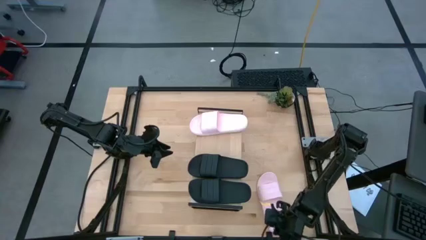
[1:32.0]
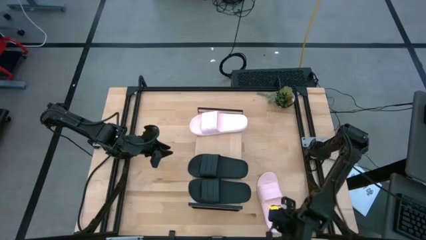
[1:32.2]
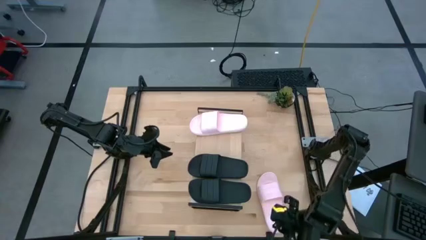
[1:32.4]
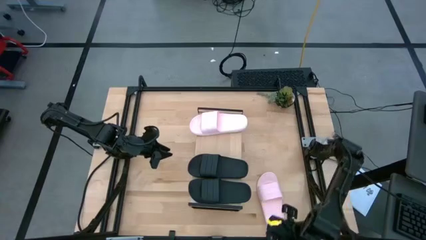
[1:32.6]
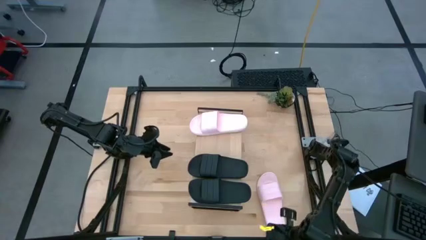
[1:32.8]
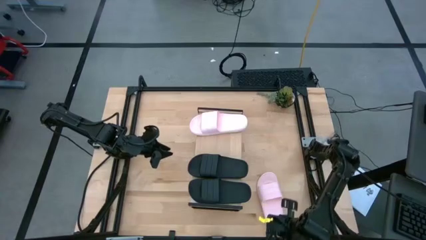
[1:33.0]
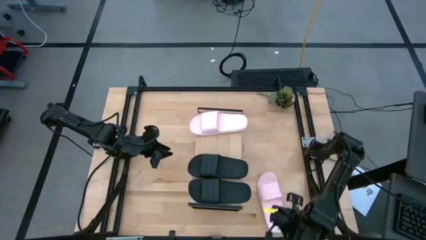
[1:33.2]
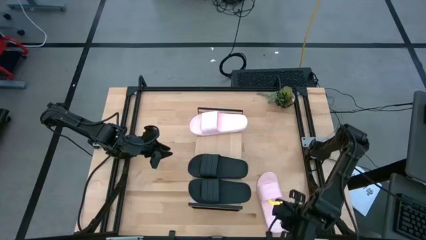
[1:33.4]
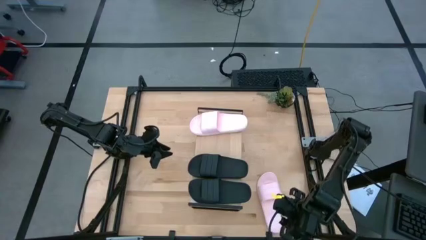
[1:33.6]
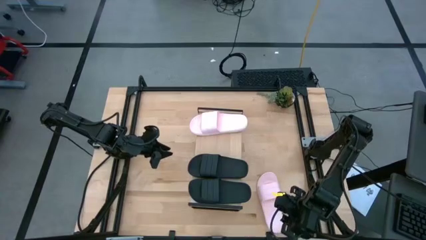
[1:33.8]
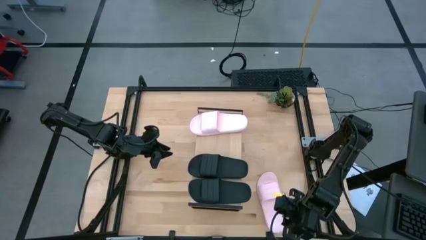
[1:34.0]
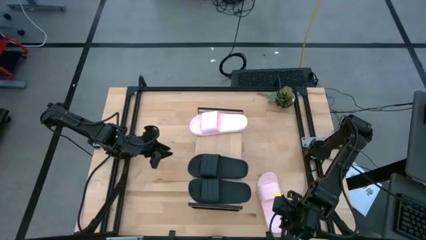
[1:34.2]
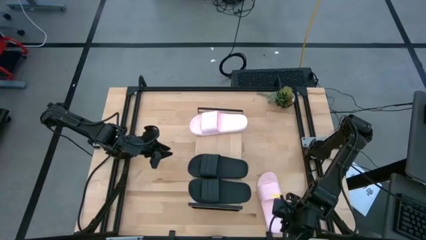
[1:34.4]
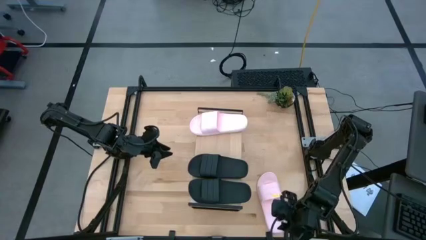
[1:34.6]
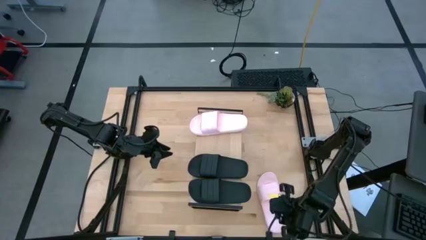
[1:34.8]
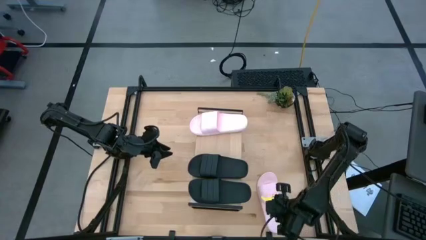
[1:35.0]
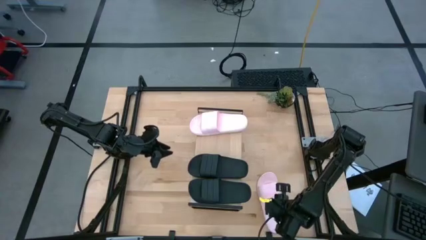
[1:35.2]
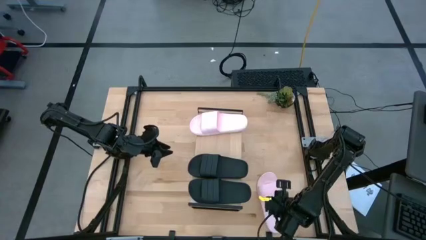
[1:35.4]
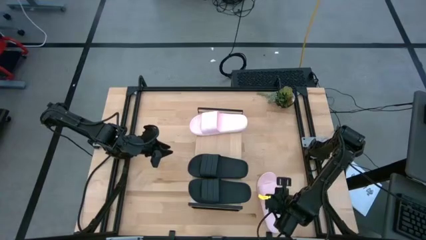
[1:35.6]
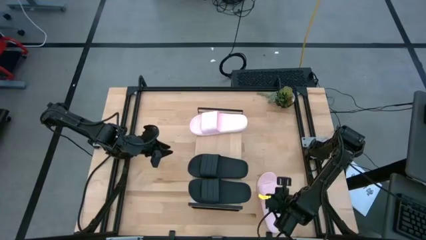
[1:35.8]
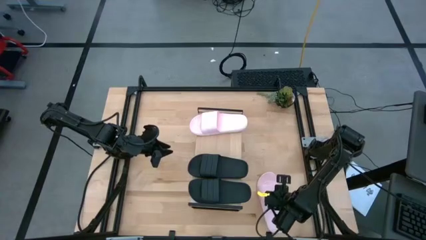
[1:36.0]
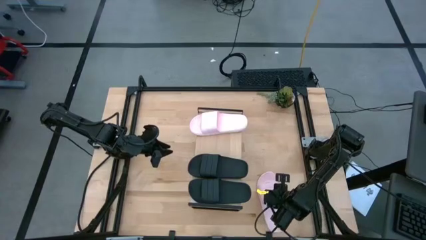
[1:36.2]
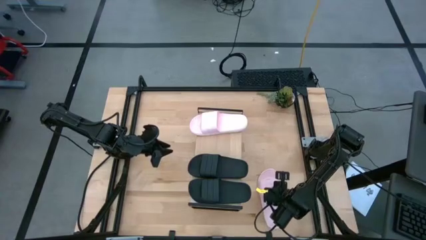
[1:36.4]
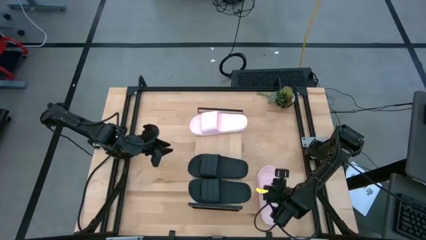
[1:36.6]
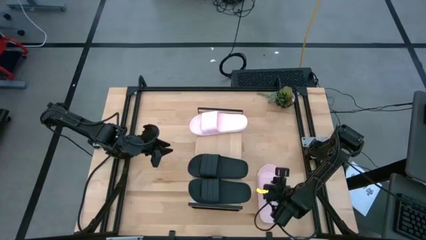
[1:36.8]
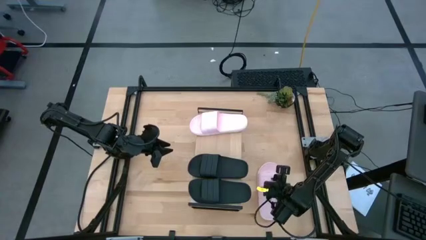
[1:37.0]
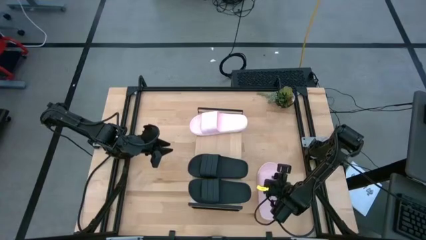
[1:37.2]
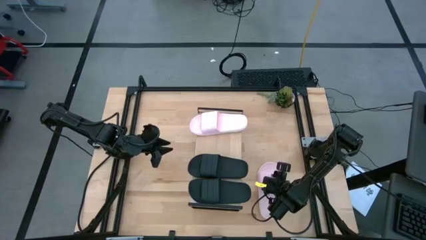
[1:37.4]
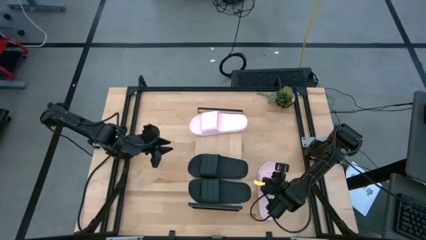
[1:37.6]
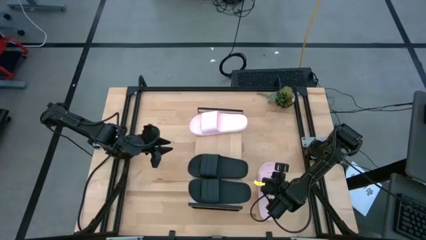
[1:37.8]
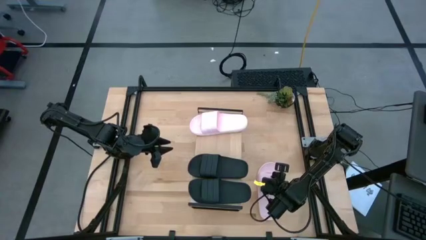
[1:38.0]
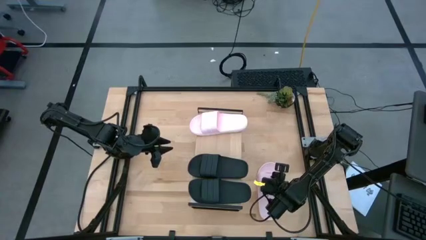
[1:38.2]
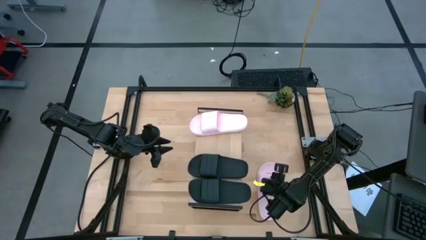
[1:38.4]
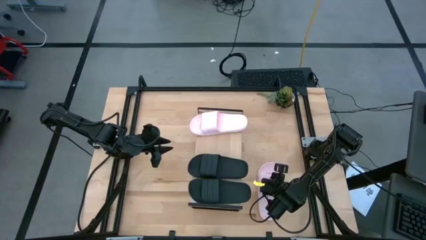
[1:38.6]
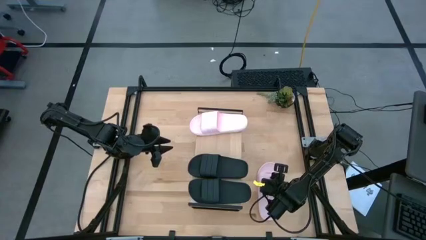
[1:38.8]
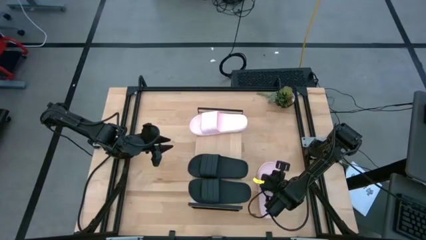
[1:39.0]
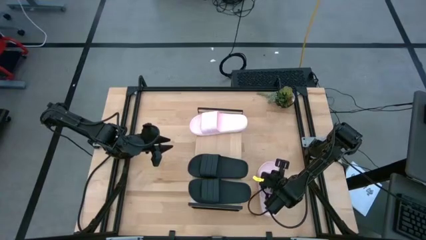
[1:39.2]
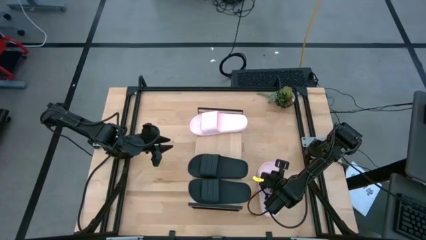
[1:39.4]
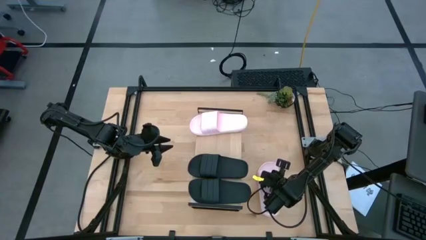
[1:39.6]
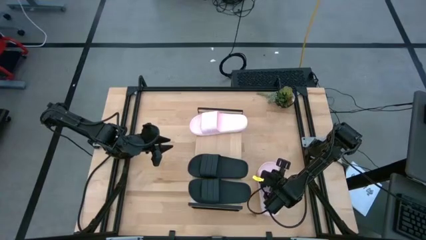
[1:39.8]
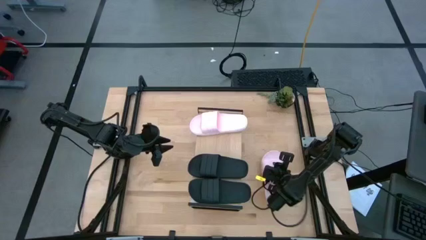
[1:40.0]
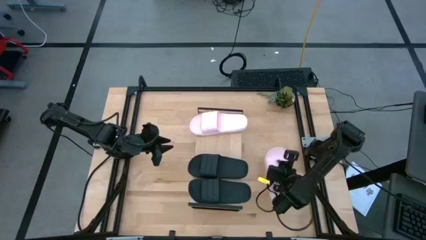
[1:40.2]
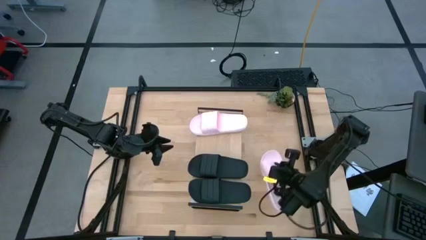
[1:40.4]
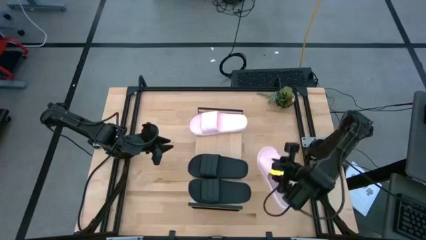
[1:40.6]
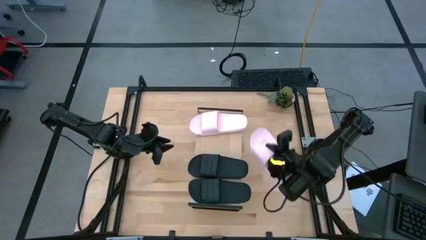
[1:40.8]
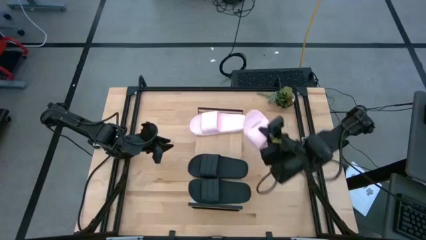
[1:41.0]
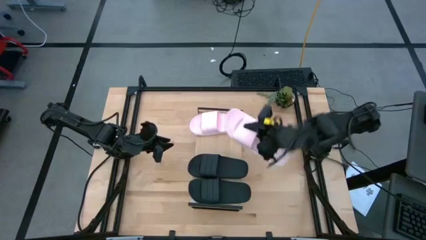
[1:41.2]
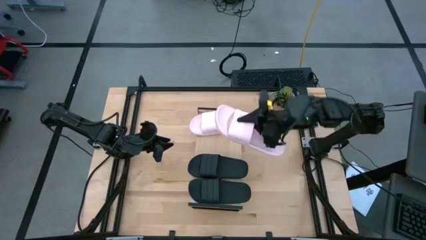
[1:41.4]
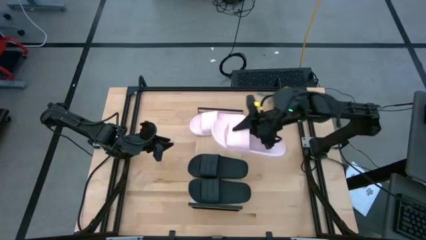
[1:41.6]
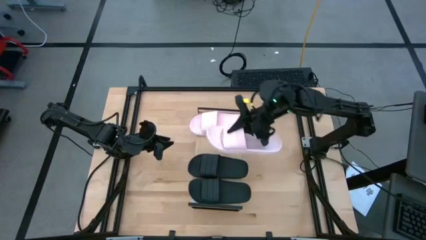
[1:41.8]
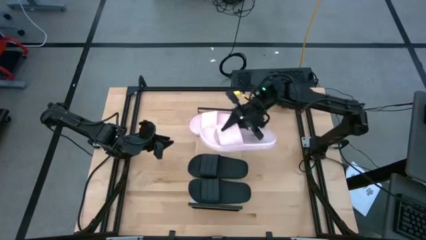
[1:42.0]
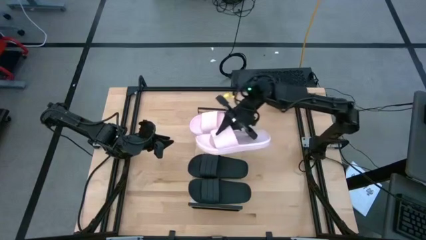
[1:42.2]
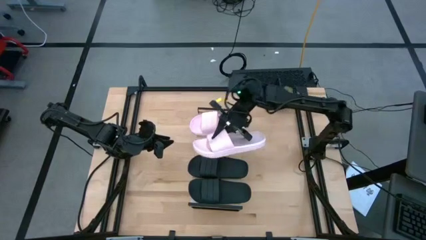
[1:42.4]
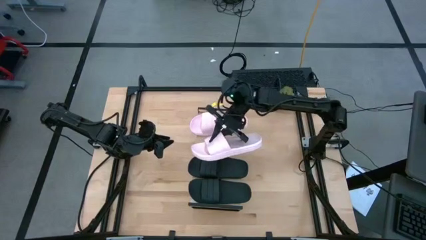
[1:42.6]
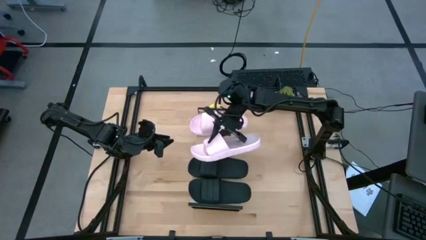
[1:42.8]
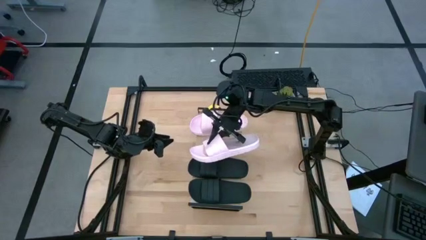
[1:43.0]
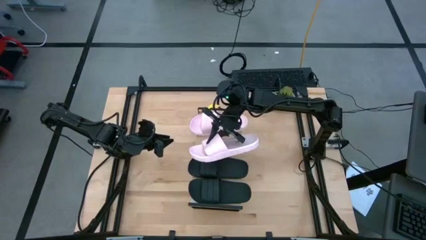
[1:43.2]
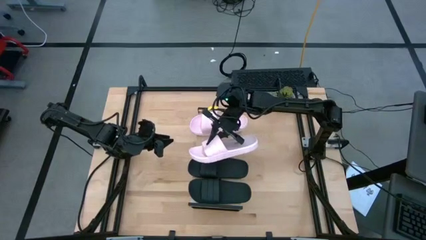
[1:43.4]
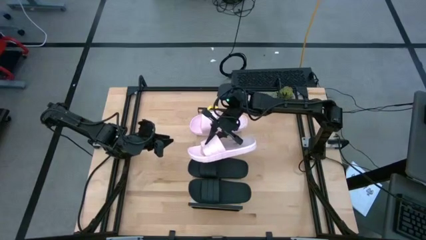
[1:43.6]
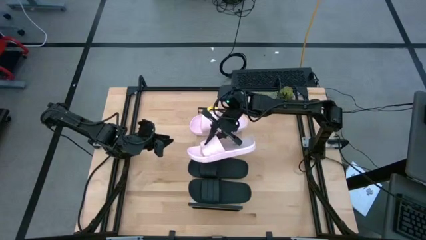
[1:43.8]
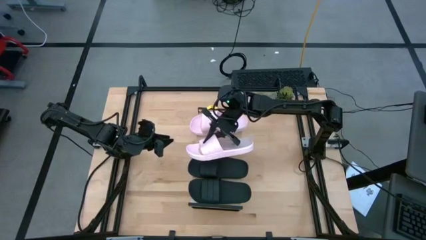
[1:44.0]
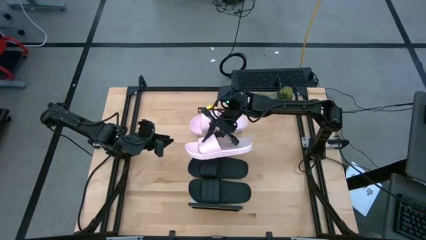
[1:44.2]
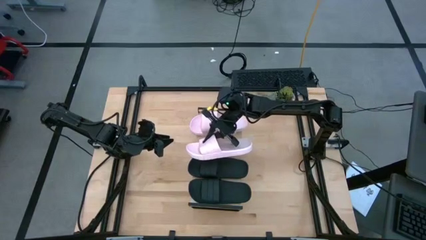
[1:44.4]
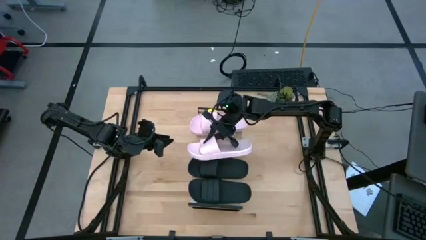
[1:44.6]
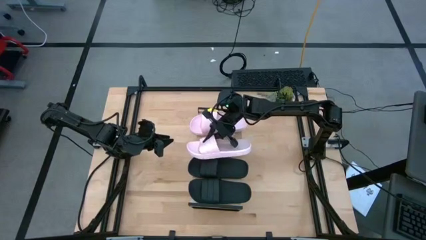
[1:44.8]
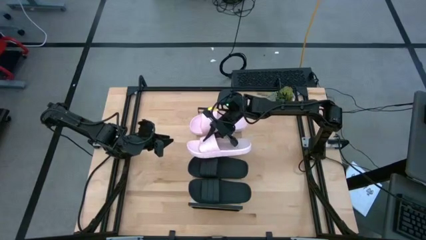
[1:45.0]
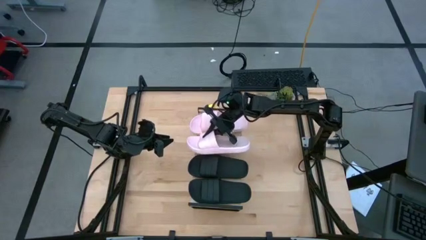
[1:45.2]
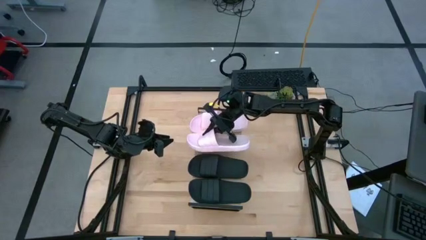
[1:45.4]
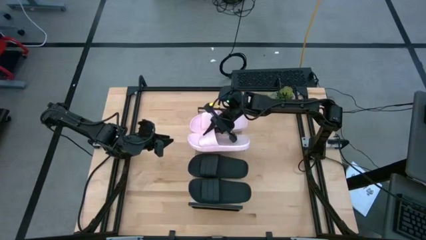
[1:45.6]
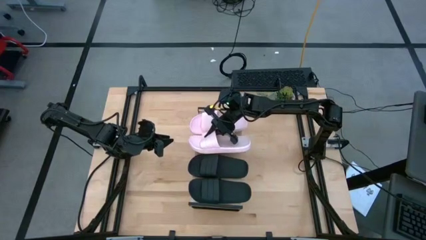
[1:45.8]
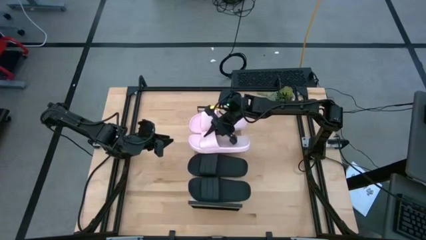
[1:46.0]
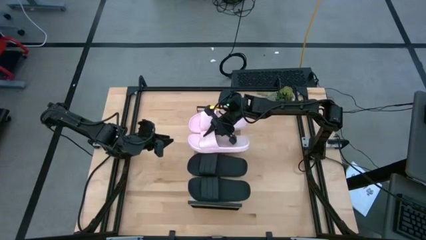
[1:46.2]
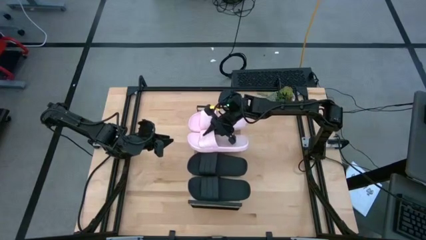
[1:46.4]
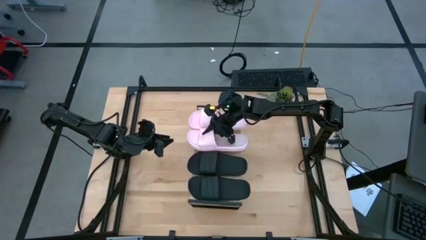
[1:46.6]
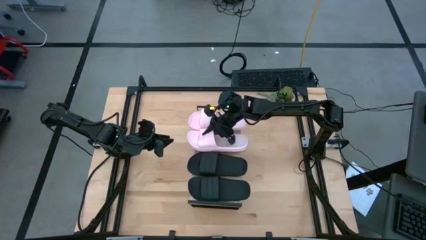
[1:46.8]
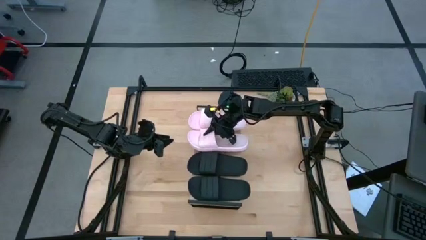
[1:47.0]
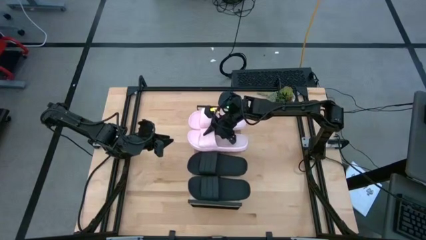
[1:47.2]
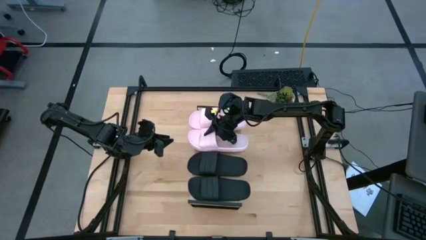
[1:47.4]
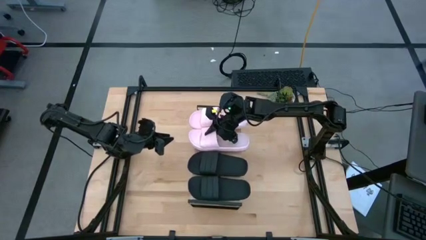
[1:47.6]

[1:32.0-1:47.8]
Task: Pick and place slides into the shelf
Put the pink slipper on the shelf

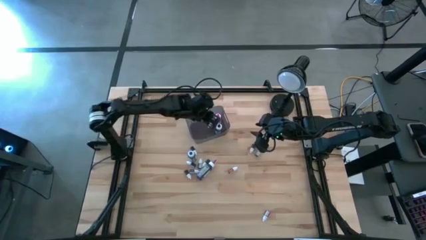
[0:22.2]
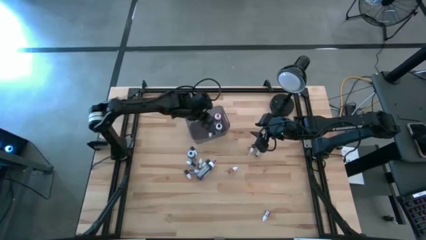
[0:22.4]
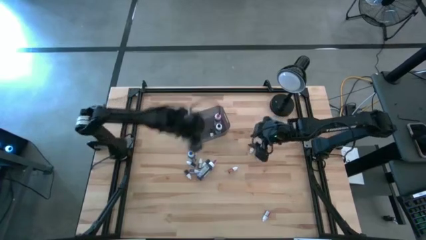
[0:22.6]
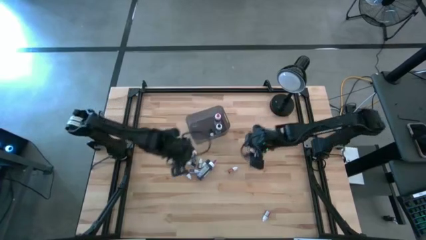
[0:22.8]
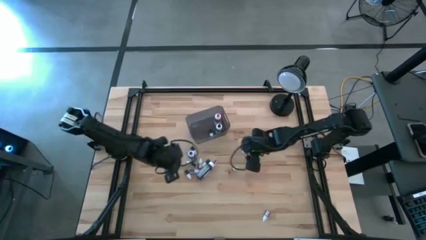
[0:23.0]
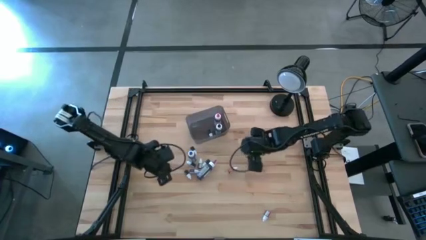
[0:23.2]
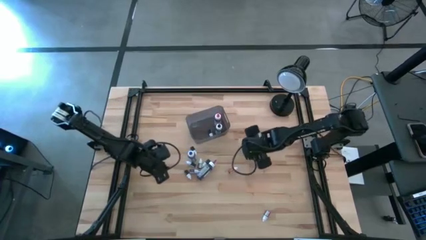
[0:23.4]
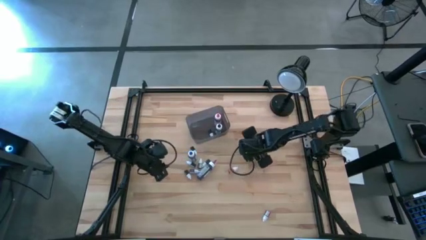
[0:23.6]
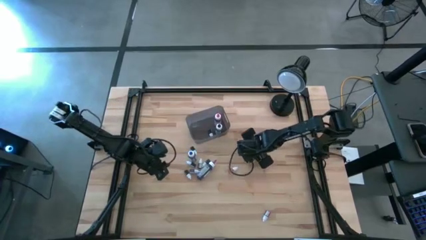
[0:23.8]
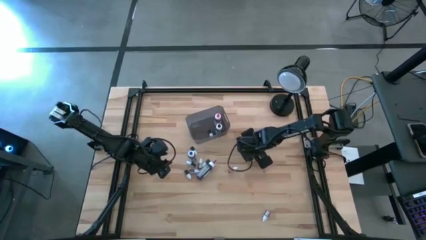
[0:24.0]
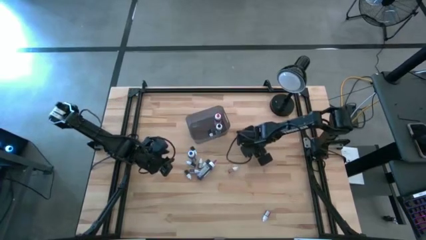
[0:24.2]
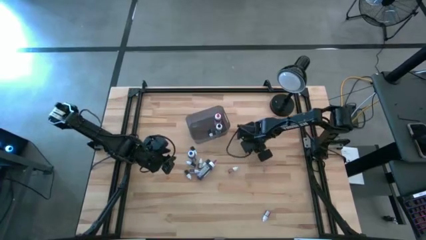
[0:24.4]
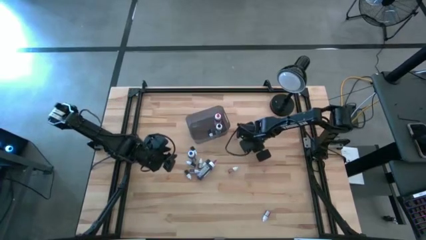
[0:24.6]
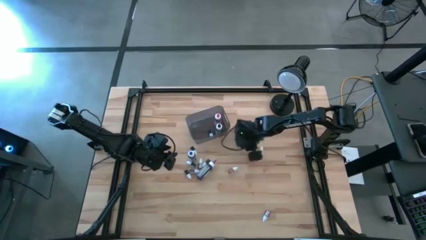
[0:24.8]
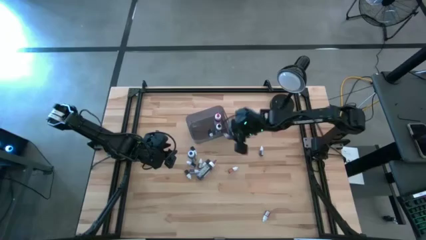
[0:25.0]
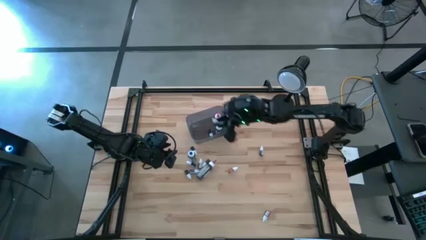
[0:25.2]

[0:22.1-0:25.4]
Task: Pick & Place food coloring
Put the small red food coloring bottle into the gray bin
